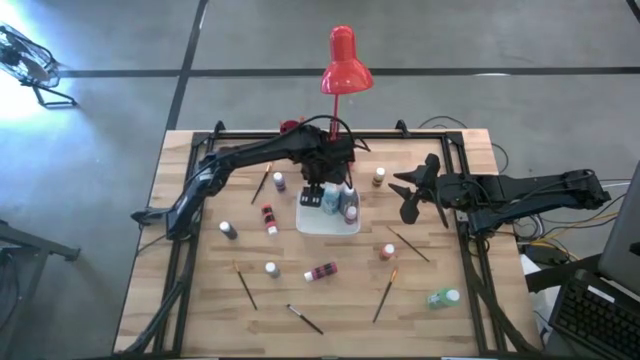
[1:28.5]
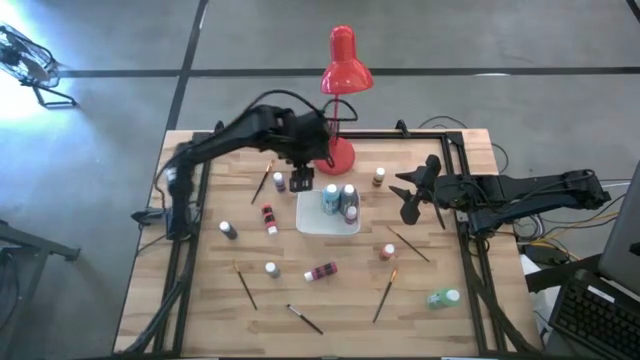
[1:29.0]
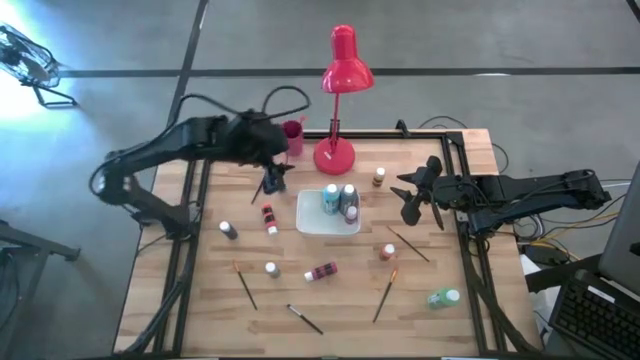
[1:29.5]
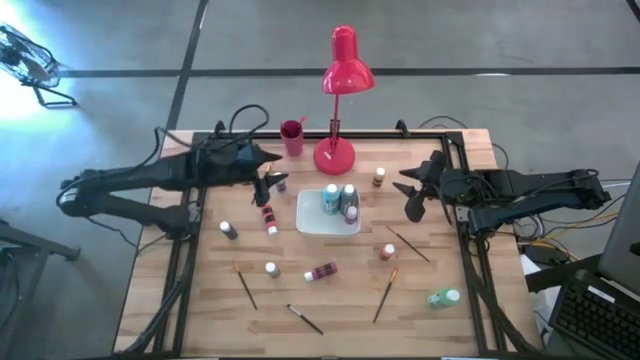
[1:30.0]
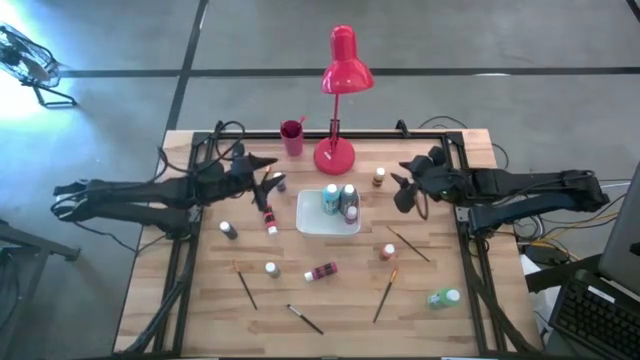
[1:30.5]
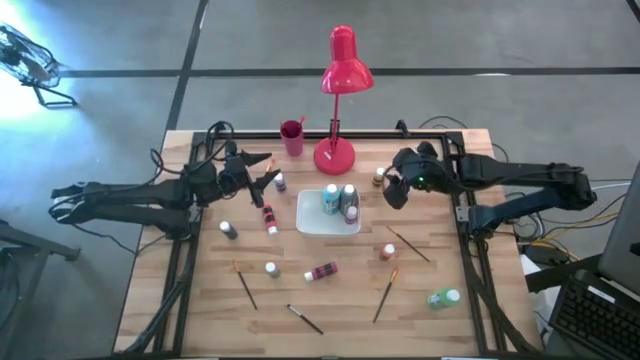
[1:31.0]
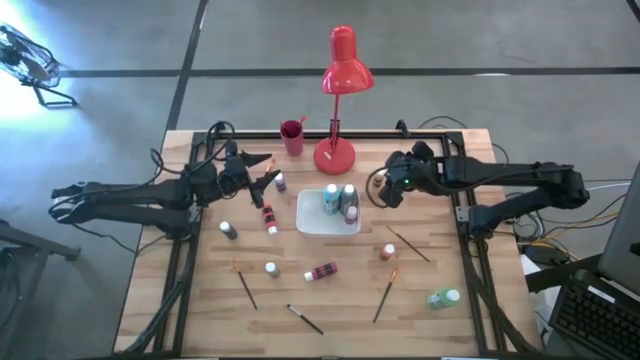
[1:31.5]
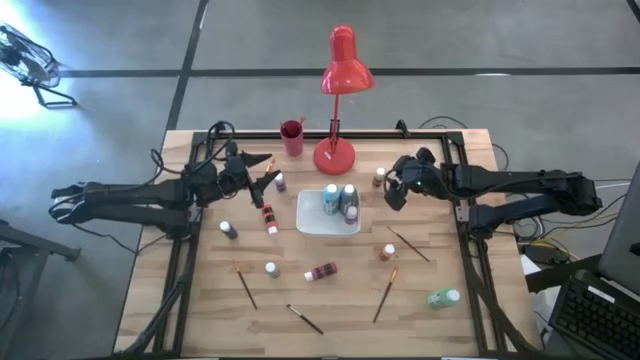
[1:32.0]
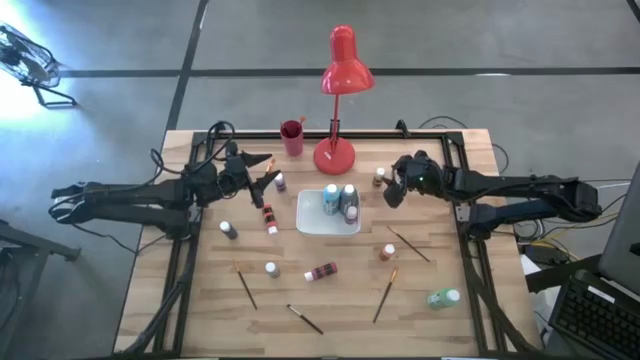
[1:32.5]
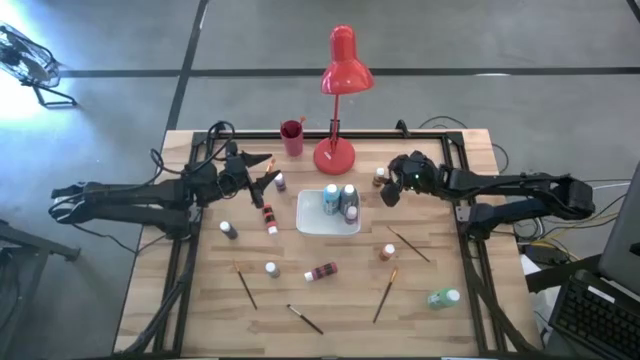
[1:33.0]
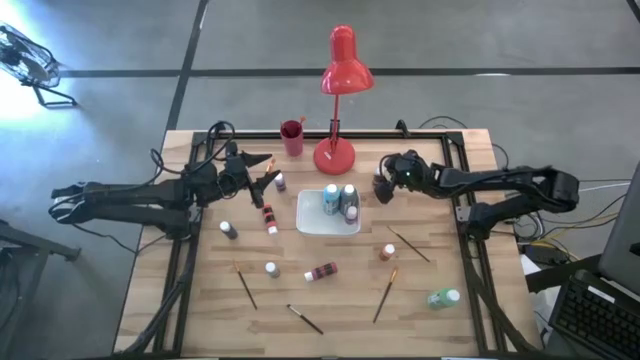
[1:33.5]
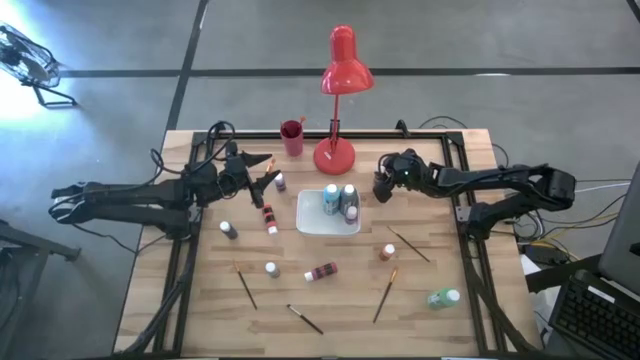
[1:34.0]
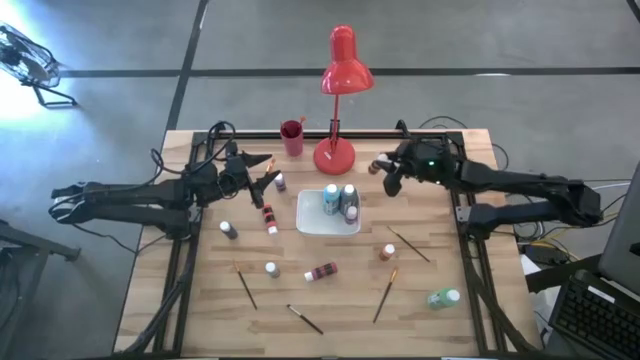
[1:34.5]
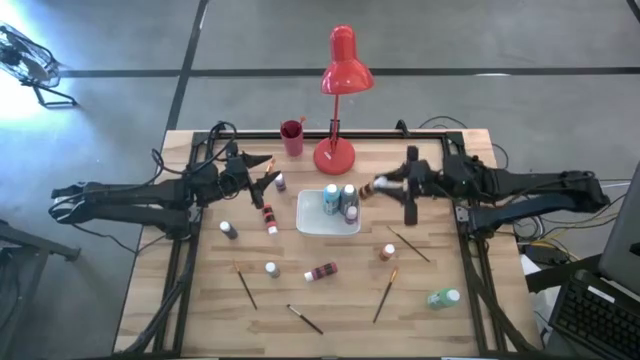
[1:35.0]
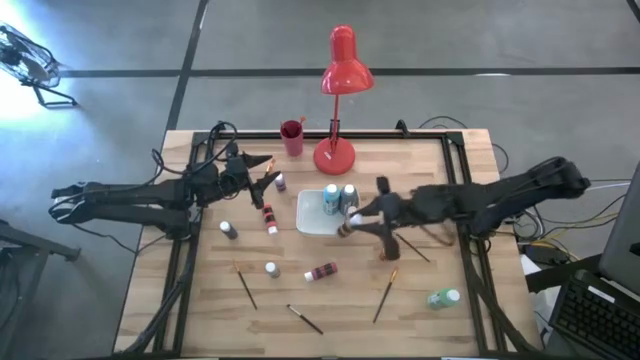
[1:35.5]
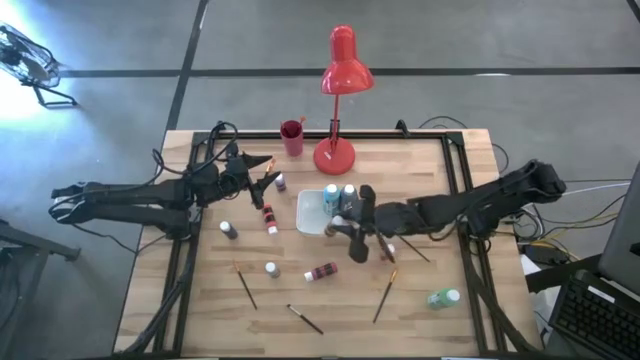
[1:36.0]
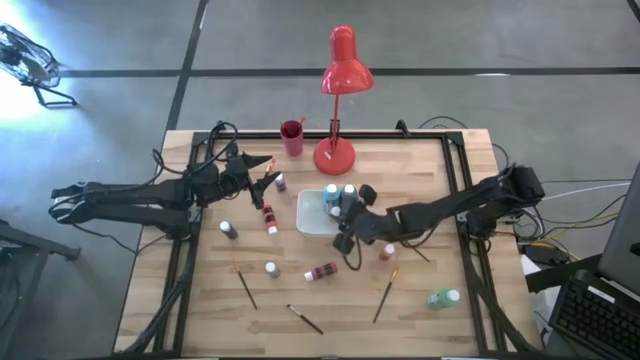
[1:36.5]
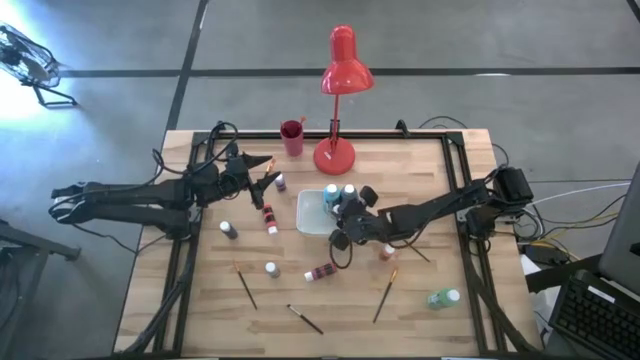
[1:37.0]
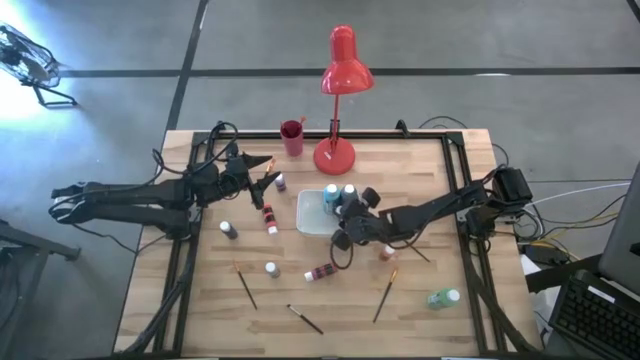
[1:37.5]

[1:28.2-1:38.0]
Task: Pick & Place Paint Supplies
Put the yellow paint bottle into the white bin

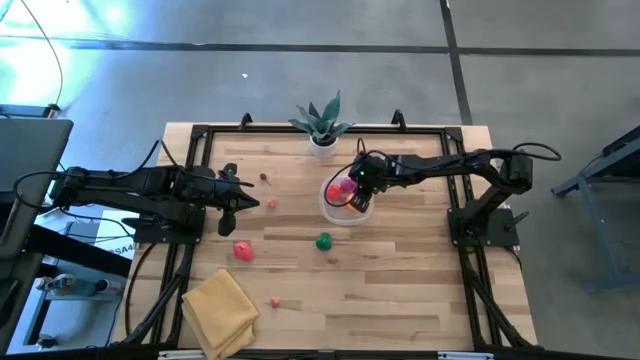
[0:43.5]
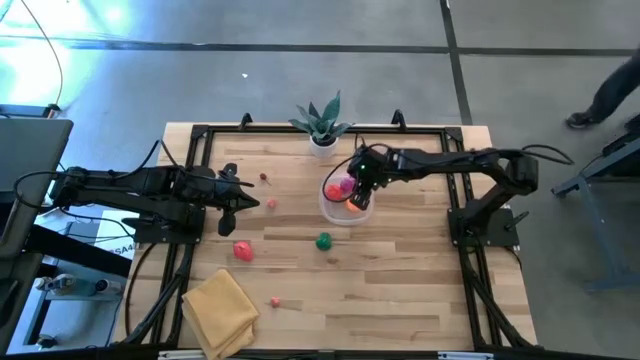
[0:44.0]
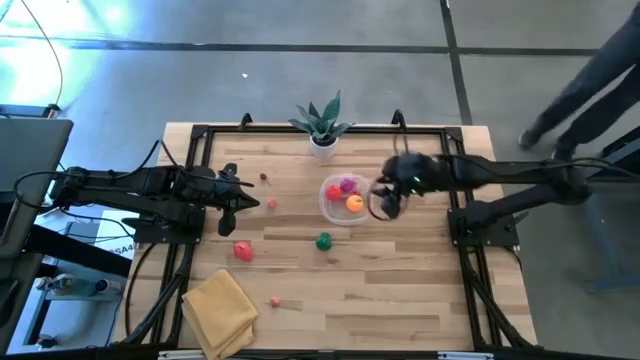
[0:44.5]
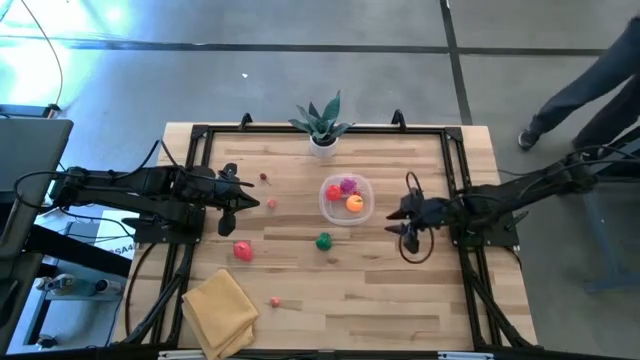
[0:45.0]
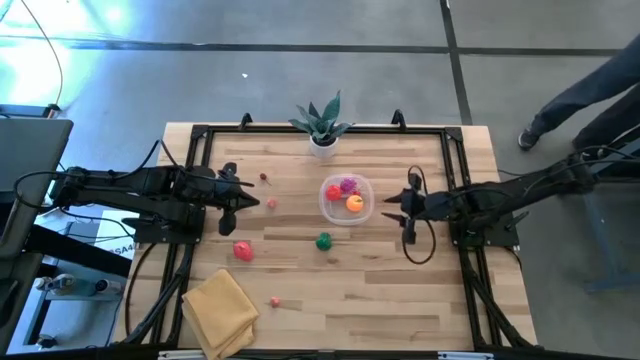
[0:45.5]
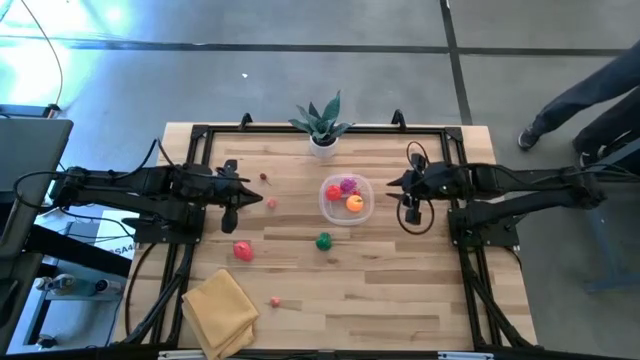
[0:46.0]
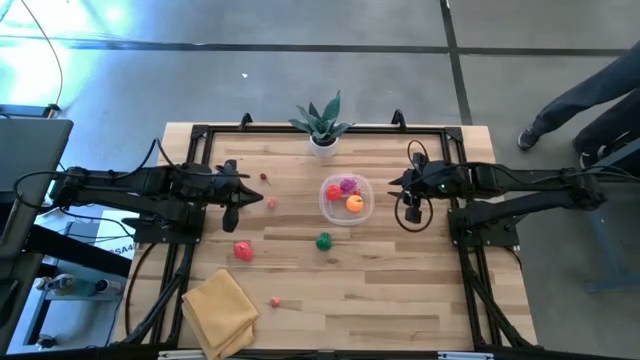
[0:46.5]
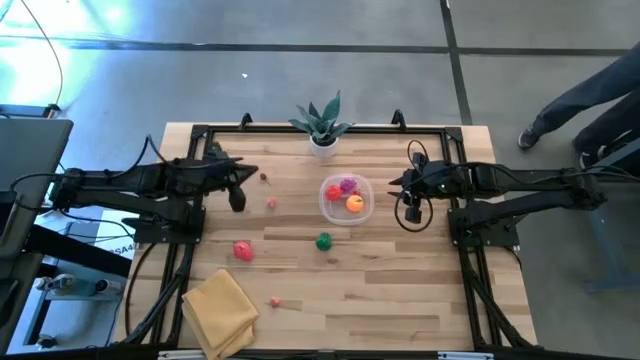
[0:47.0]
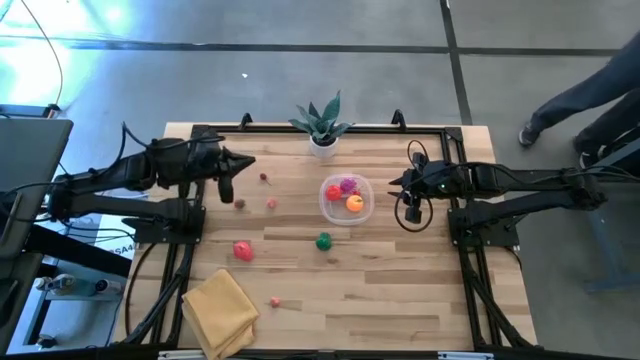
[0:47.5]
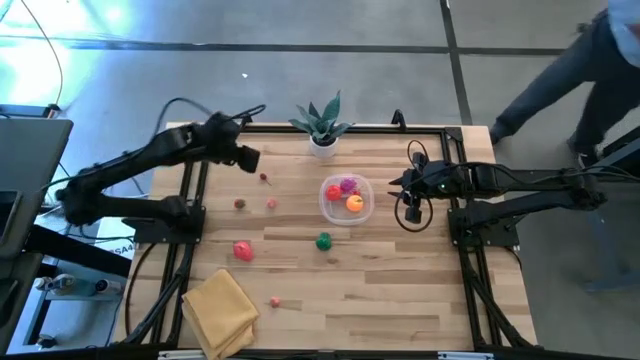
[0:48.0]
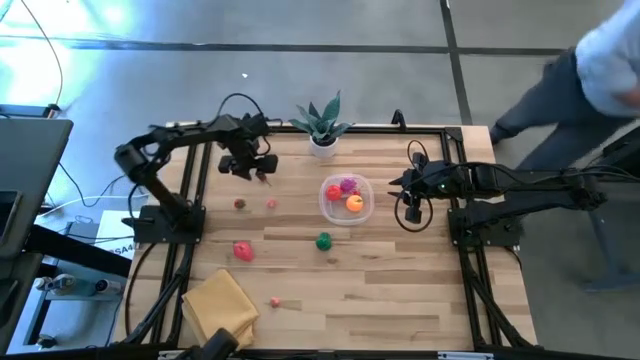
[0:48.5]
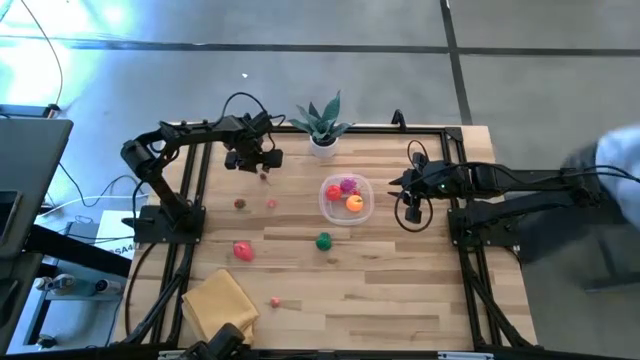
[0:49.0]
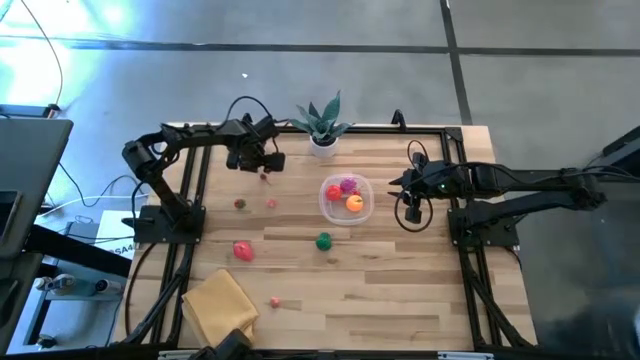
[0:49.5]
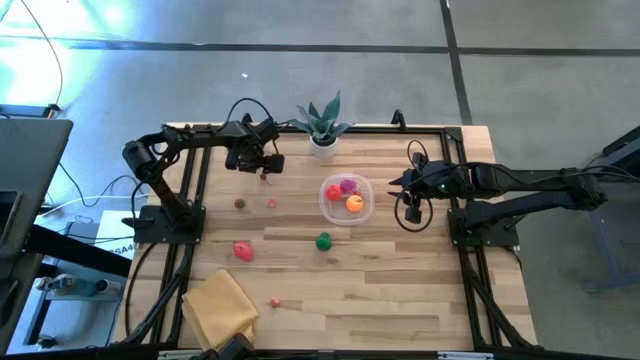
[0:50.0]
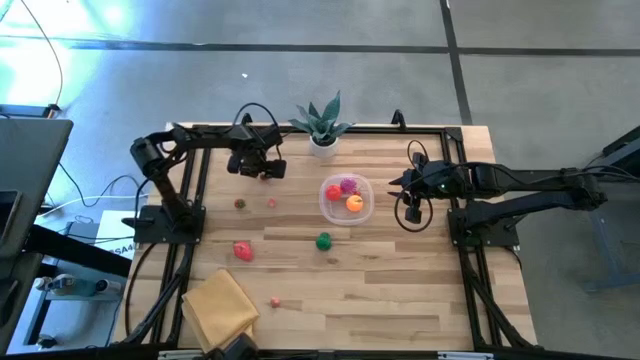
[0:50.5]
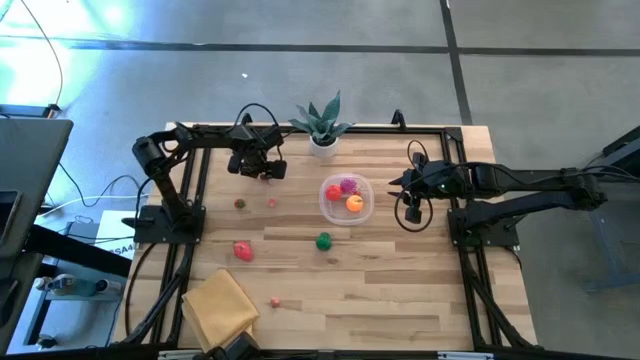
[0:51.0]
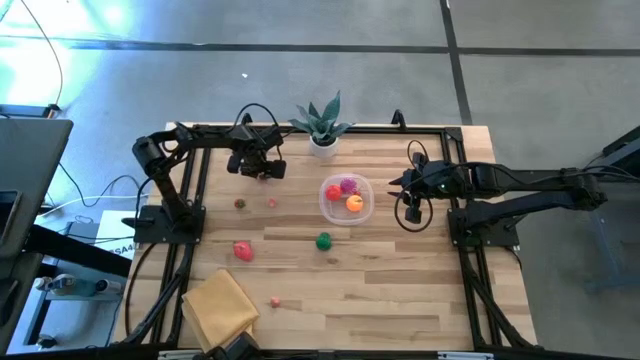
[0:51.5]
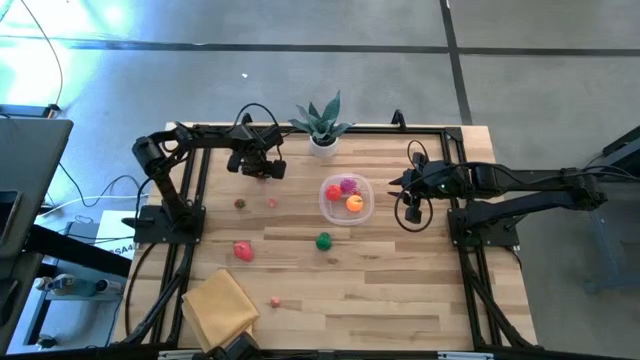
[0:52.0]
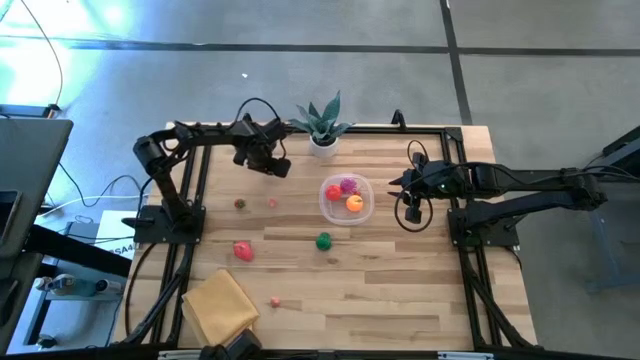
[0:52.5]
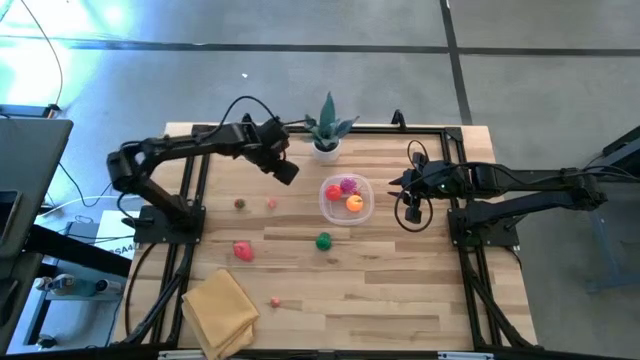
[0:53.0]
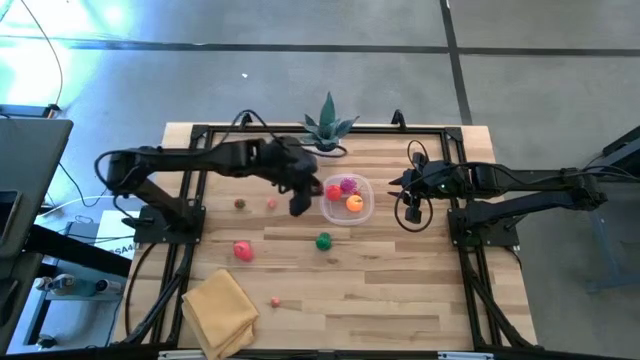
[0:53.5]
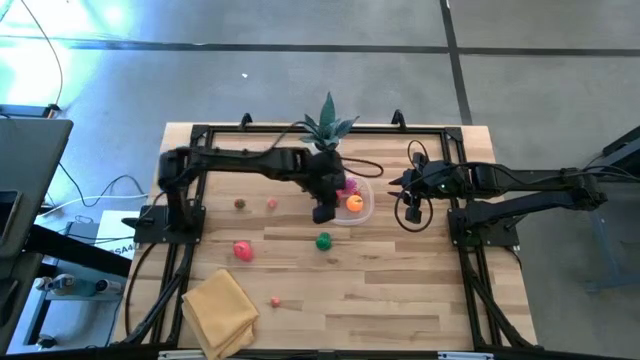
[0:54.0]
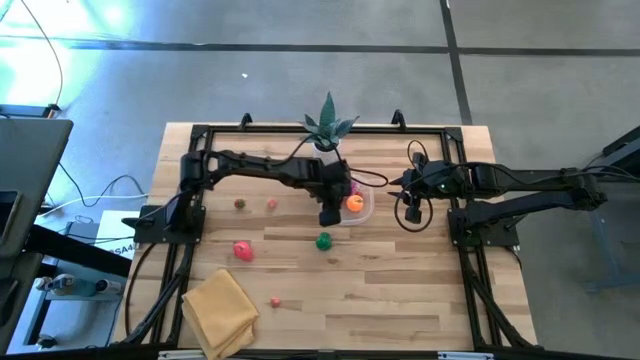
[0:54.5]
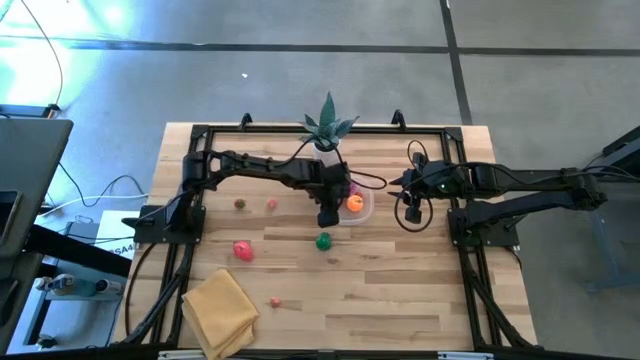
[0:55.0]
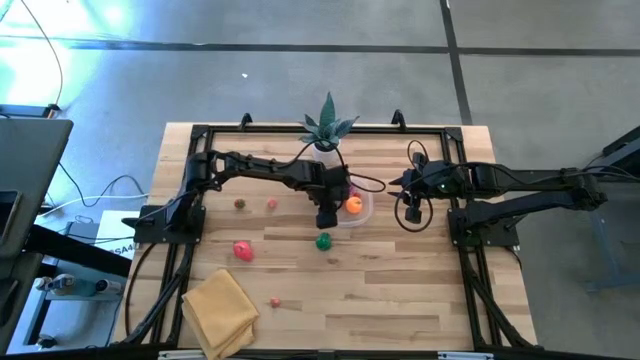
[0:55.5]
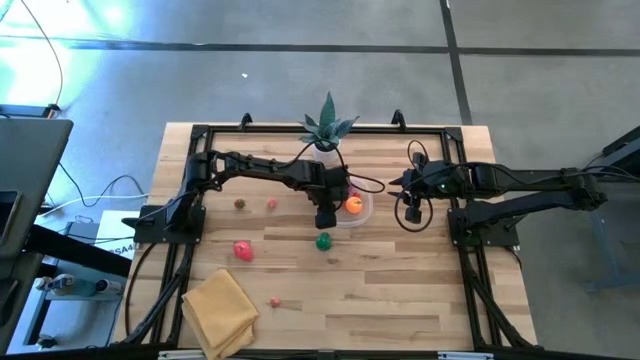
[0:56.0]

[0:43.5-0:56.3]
Task: Pick and placing Produce into tupperware
Put the red cherry into the transparent container
